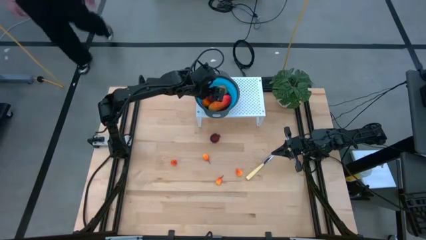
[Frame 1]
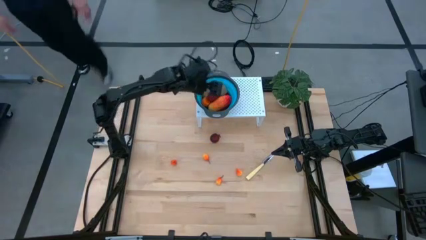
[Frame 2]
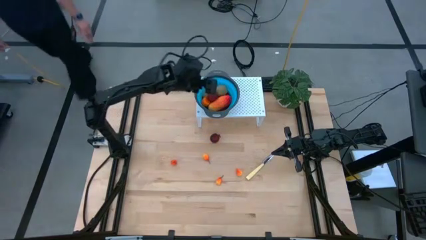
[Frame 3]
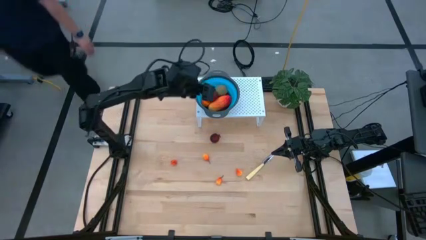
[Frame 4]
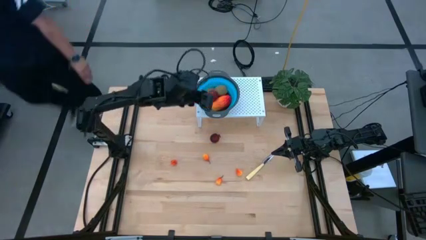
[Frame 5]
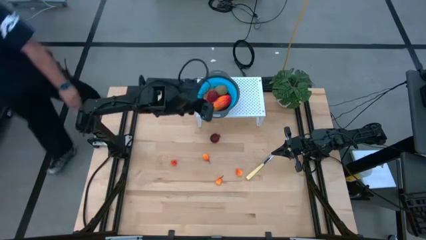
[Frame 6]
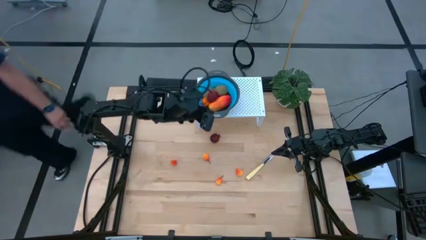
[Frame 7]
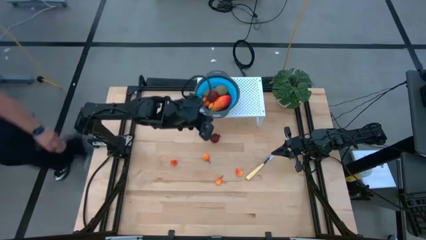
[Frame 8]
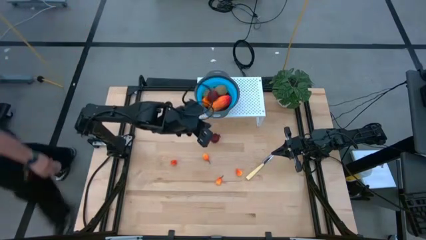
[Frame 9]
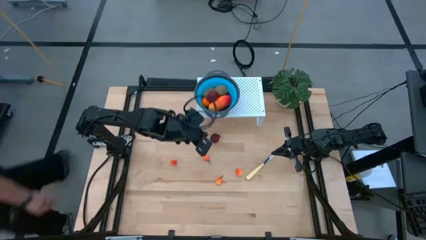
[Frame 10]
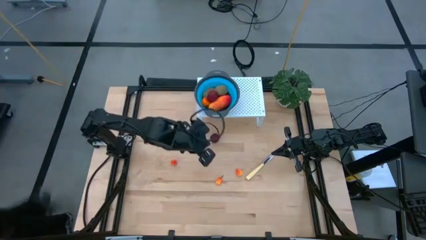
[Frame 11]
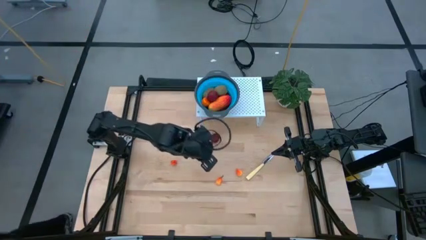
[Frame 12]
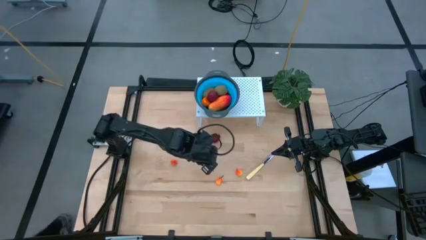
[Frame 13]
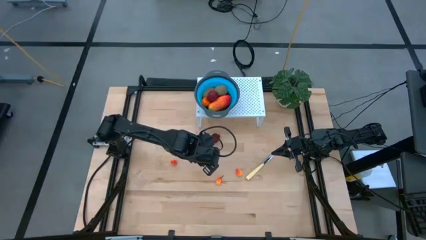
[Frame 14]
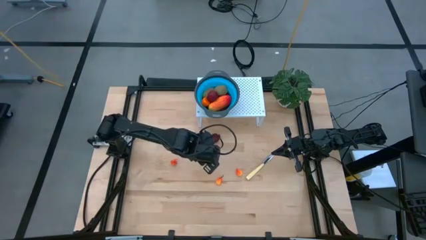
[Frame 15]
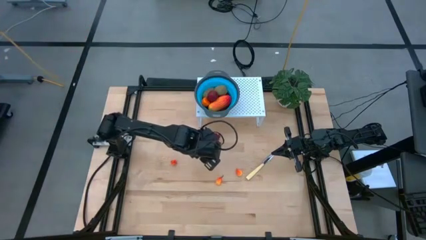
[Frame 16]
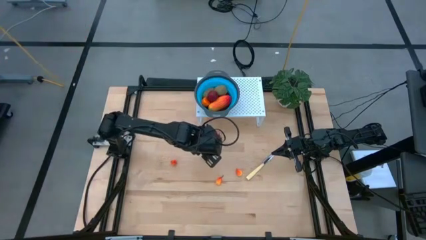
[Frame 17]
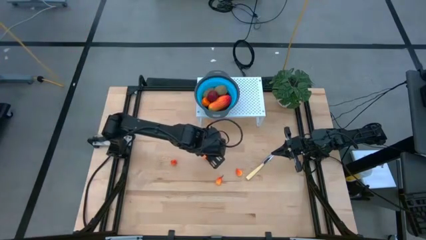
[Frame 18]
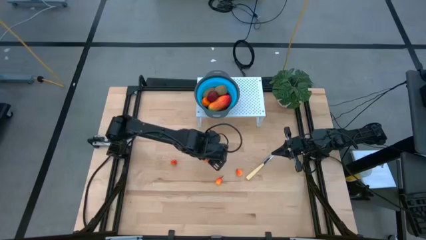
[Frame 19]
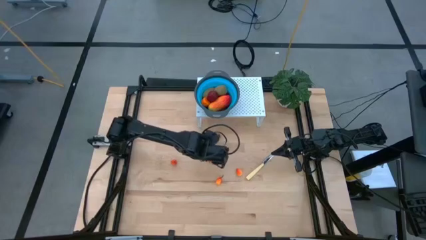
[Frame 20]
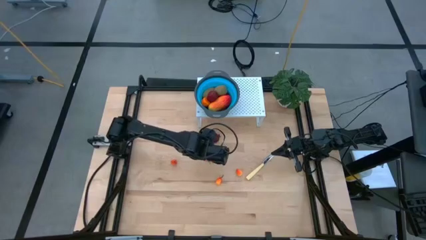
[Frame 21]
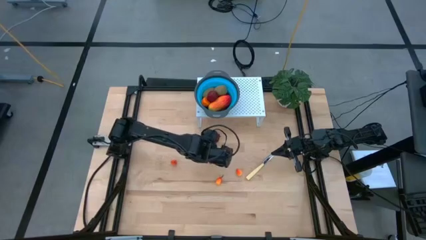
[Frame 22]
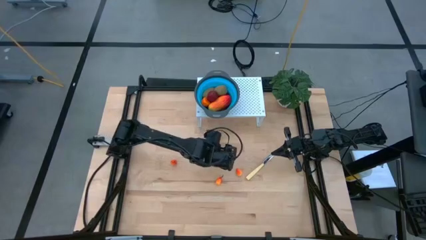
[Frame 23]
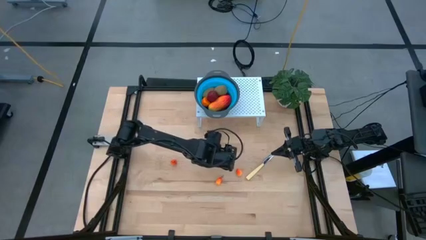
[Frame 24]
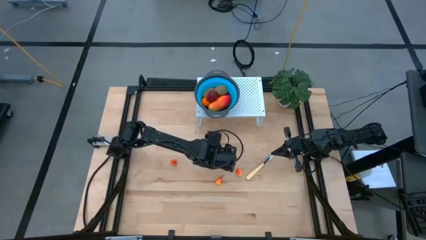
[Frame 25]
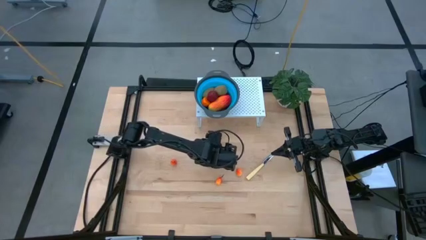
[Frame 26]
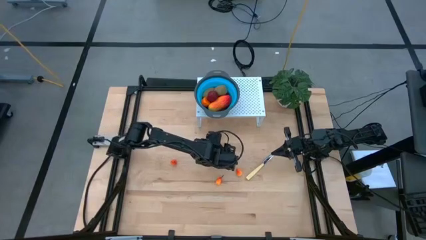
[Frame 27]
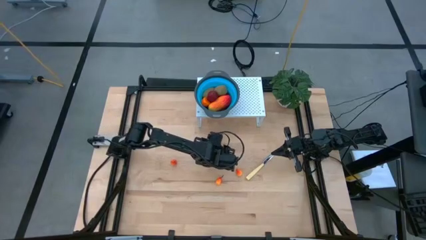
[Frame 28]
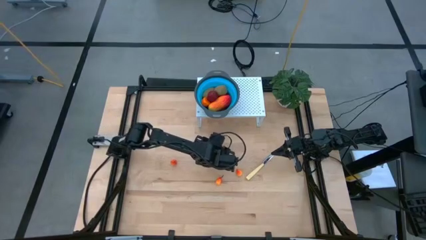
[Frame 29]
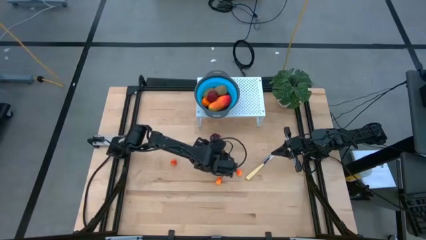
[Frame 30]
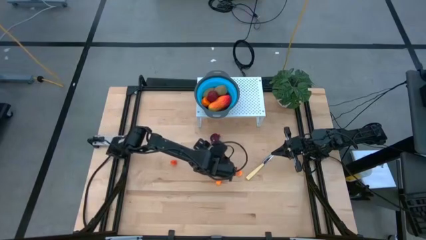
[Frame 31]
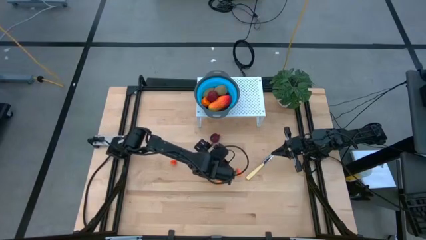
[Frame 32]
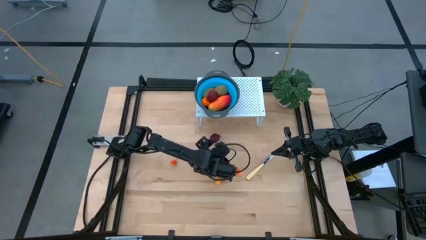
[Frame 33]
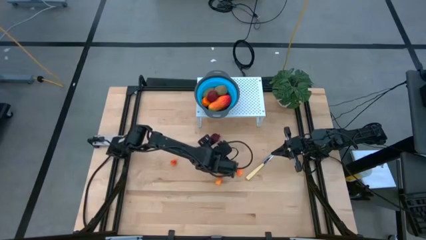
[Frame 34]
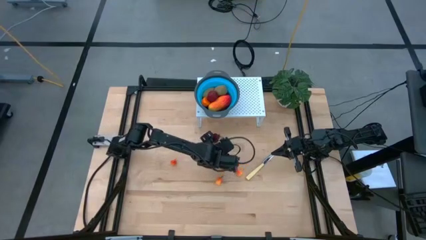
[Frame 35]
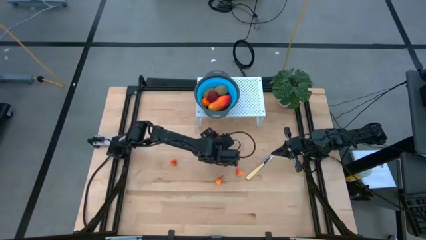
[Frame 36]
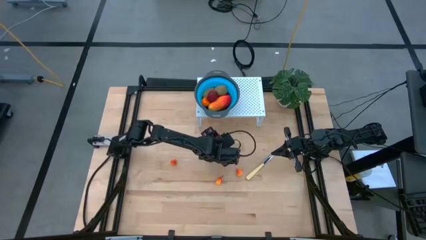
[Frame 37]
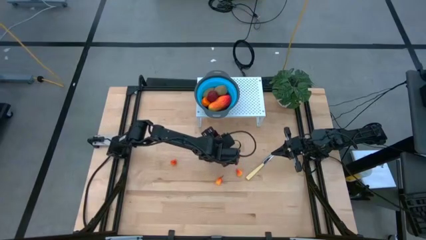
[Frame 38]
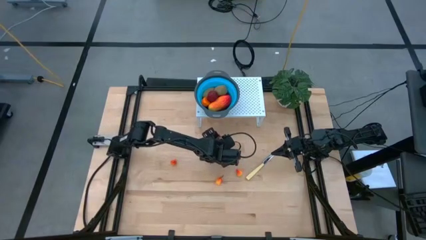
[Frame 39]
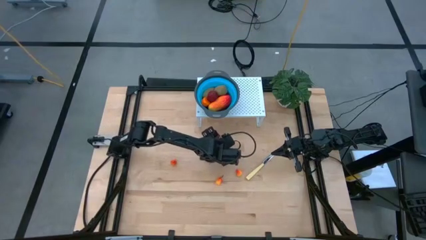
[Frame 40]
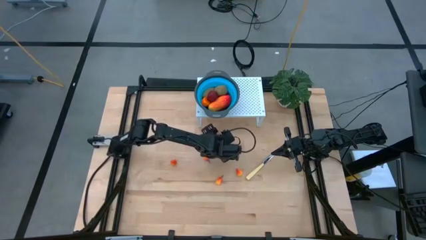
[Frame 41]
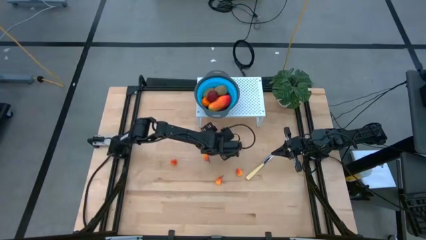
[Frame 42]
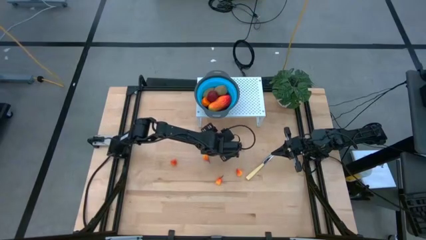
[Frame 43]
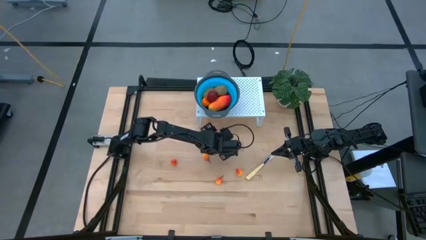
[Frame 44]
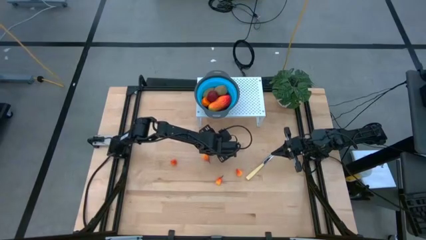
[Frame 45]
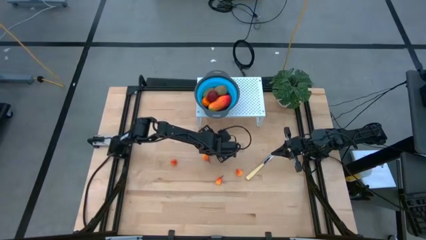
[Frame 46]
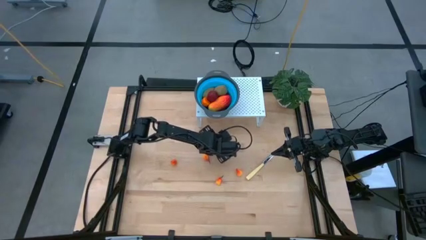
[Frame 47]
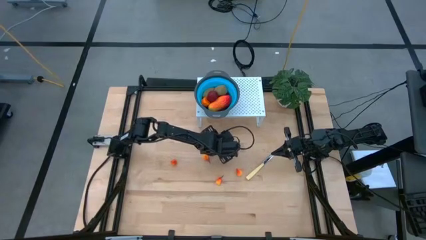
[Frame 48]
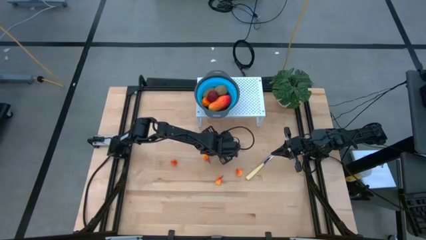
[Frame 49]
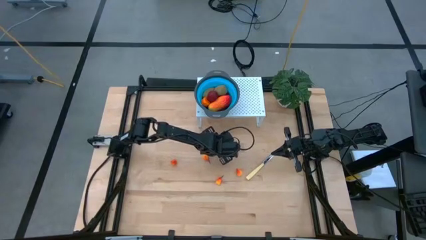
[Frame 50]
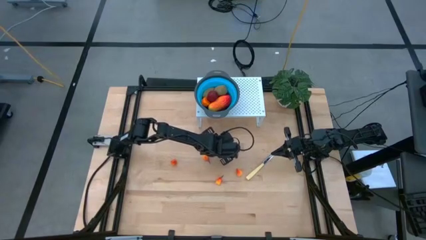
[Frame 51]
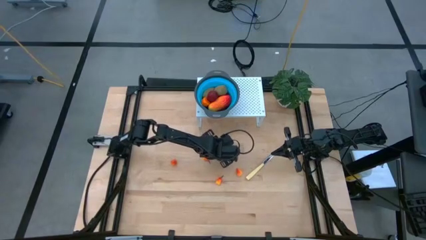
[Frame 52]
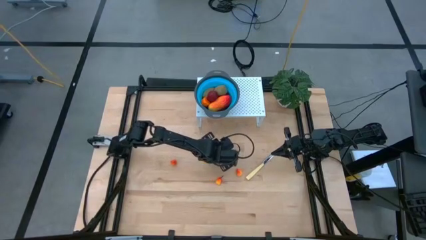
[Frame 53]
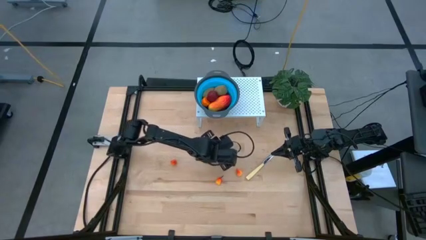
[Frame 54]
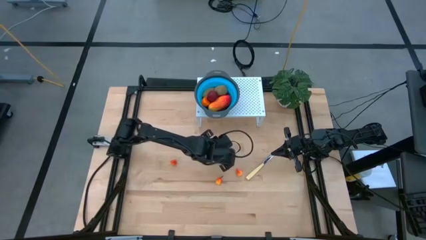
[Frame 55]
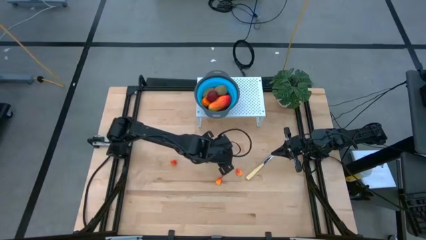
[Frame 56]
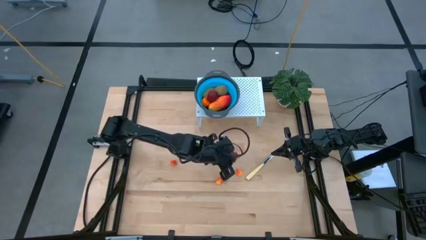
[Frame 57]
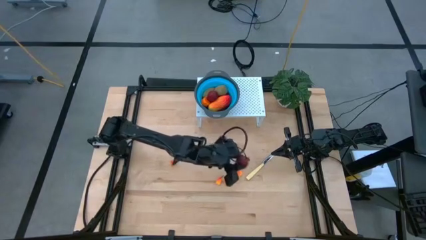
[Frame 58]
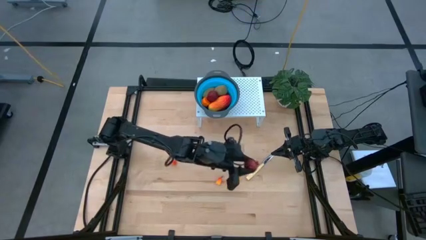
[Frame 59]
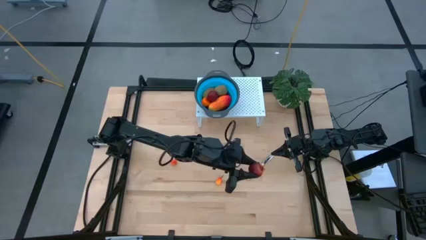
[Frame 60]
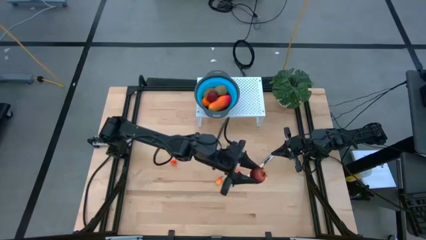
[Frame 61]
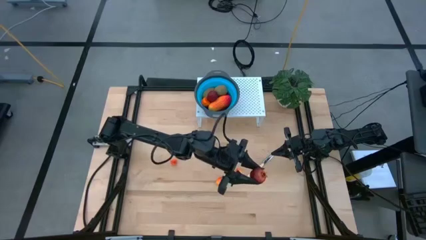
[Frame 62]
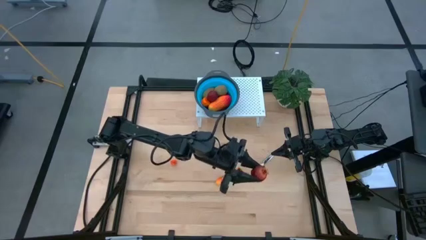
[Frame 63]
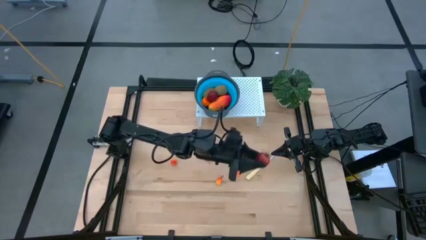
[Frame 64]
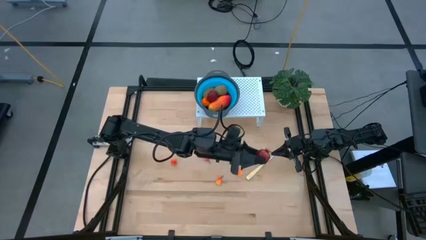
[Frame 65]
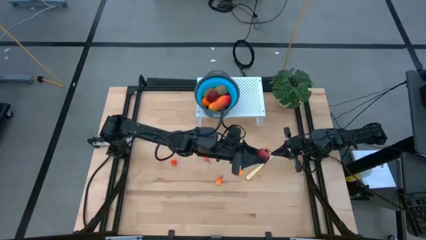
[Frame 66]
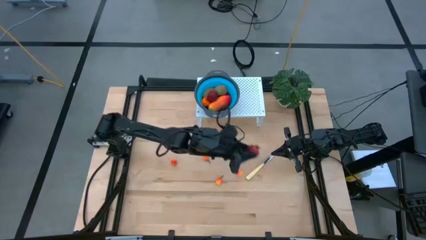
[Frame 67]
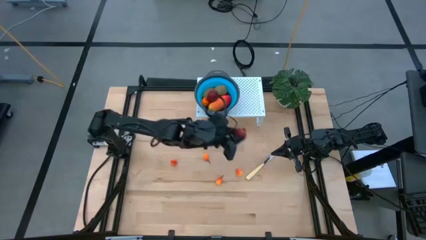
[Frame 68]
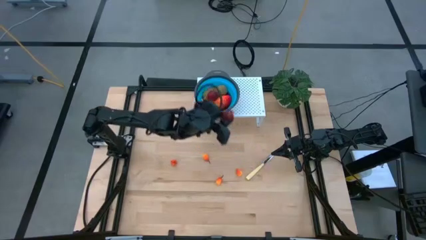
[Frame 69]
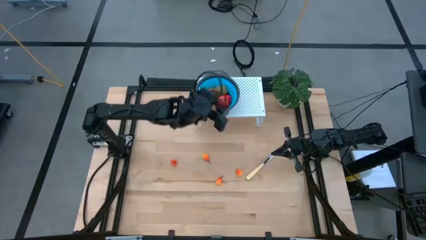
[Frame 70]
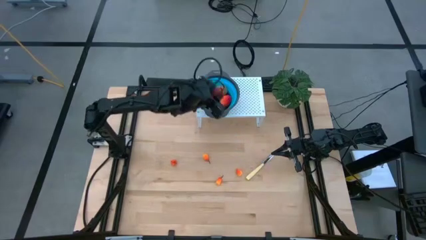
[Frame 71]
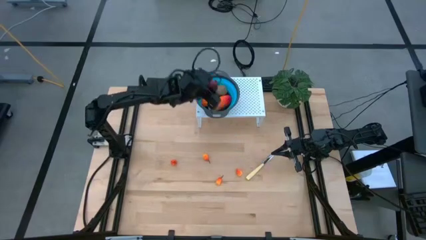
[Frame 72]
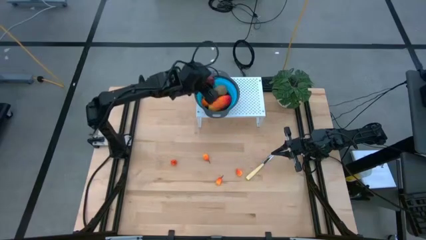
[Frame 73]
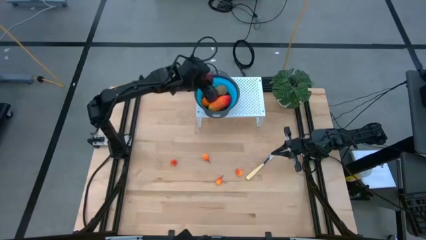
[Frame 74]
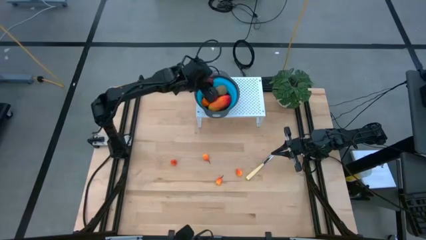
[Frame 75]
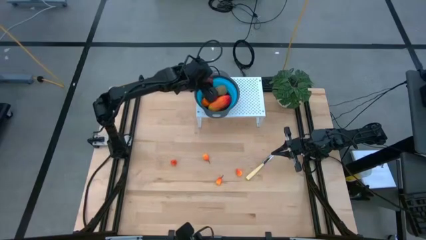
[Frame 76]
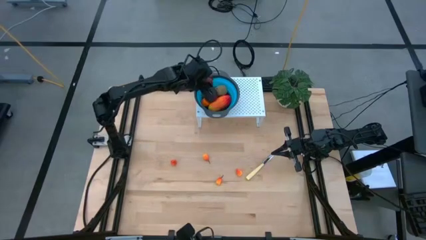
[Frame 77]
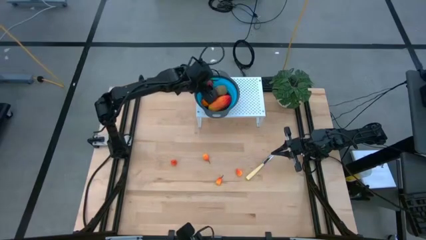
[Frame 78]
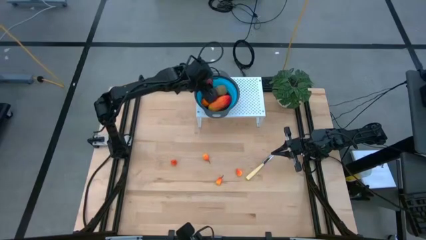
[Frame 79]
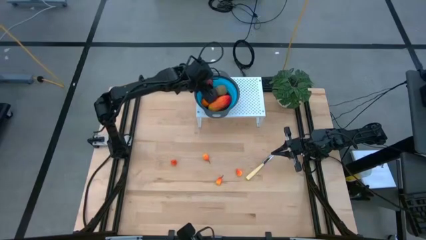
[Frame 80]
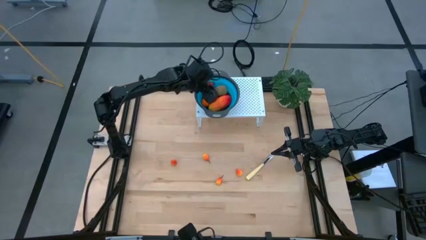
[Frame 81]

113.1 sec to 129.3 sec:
Task: Pick & Place Fruit
Put the pomegranate into the blue strainer bowl on the shelf
